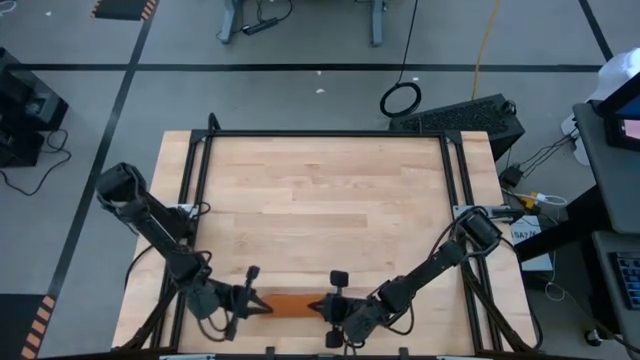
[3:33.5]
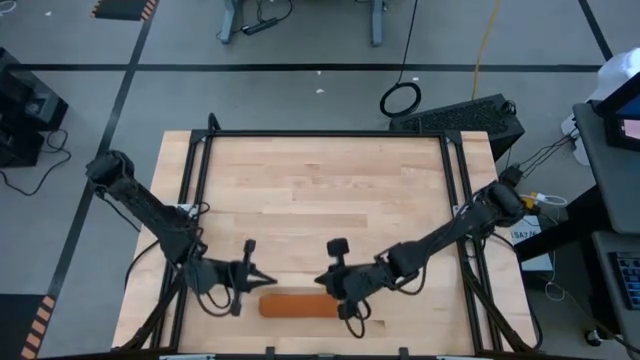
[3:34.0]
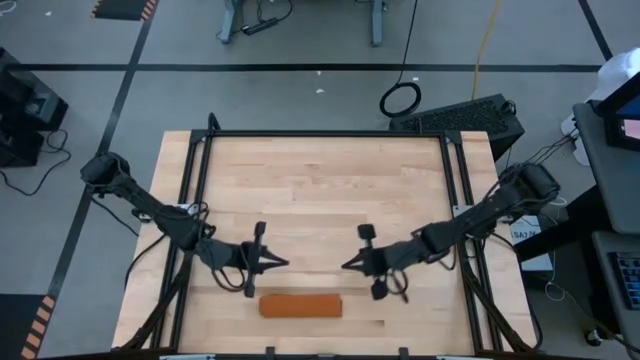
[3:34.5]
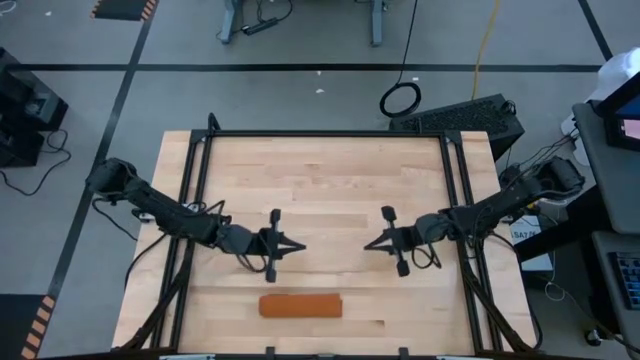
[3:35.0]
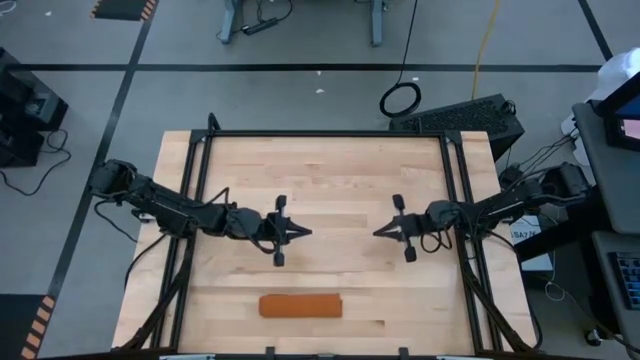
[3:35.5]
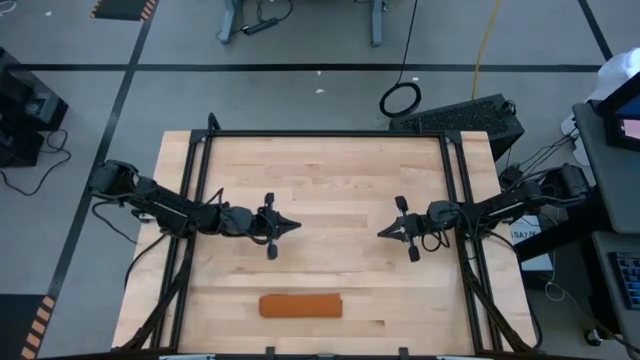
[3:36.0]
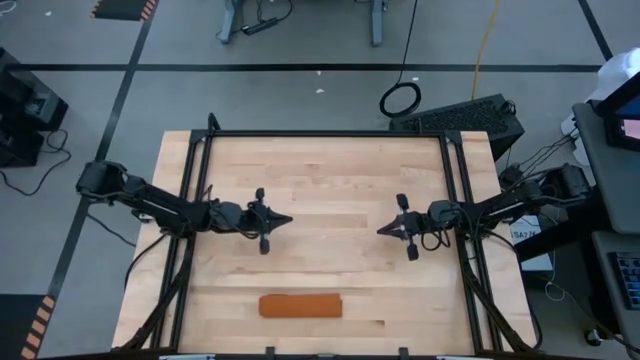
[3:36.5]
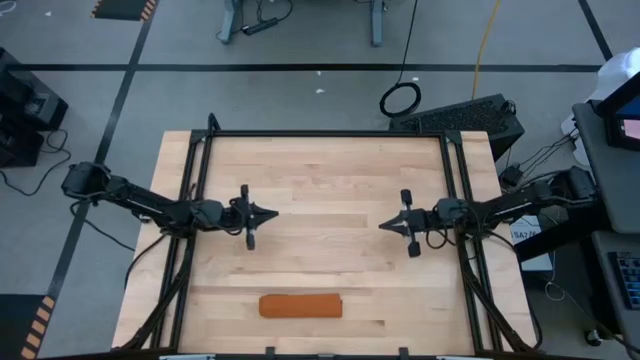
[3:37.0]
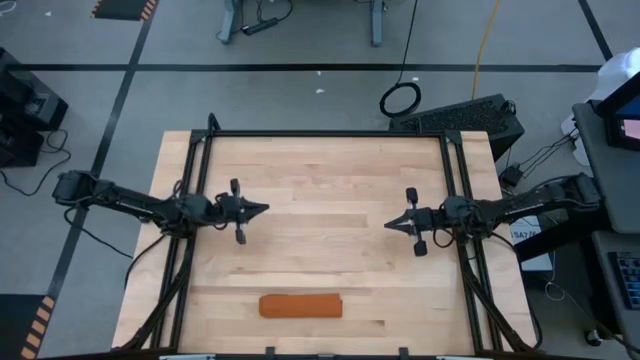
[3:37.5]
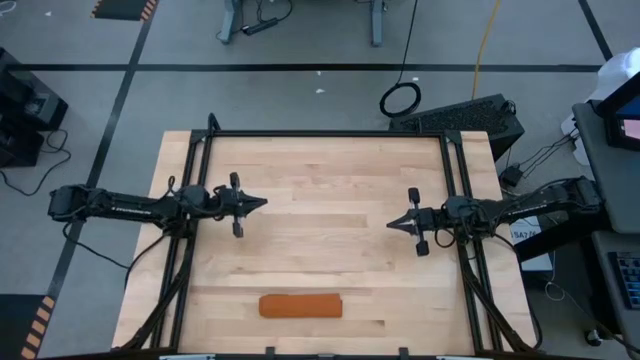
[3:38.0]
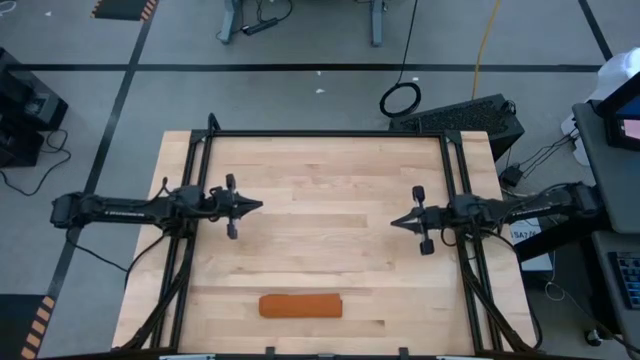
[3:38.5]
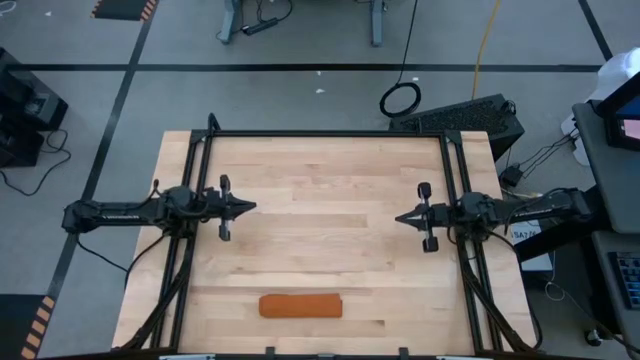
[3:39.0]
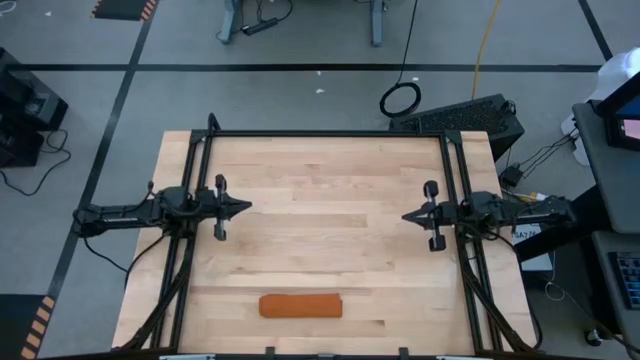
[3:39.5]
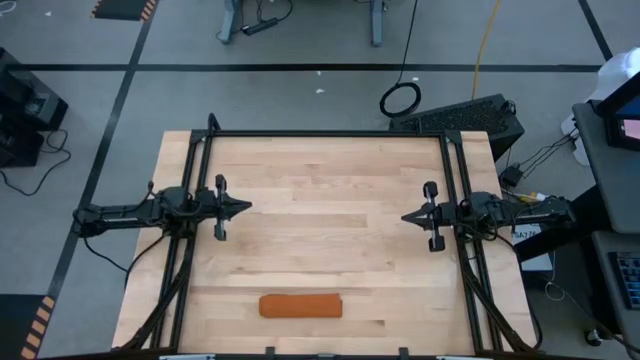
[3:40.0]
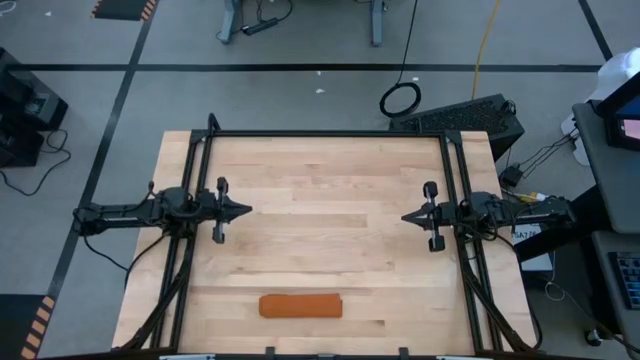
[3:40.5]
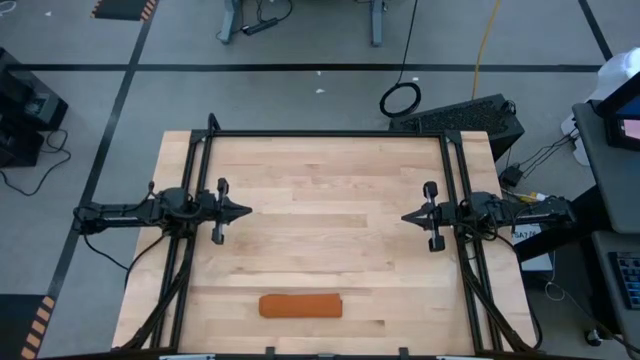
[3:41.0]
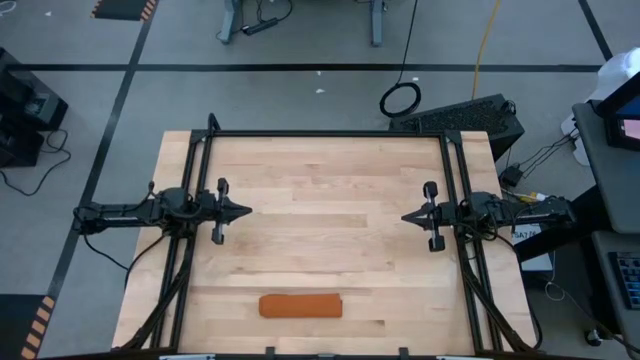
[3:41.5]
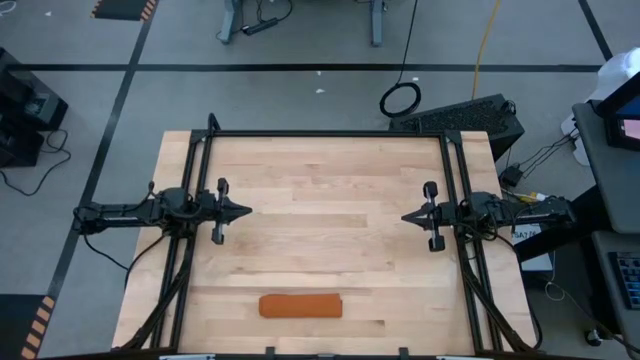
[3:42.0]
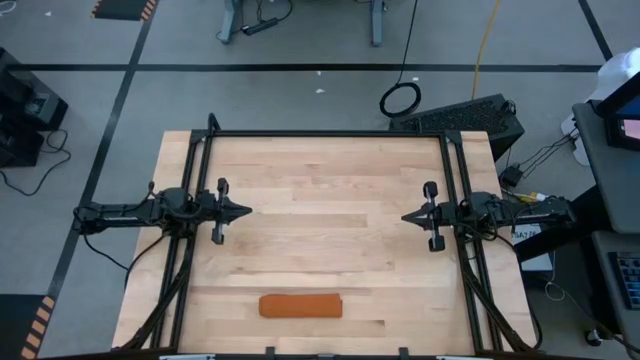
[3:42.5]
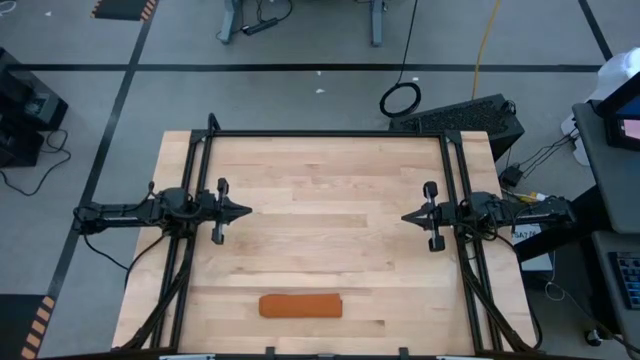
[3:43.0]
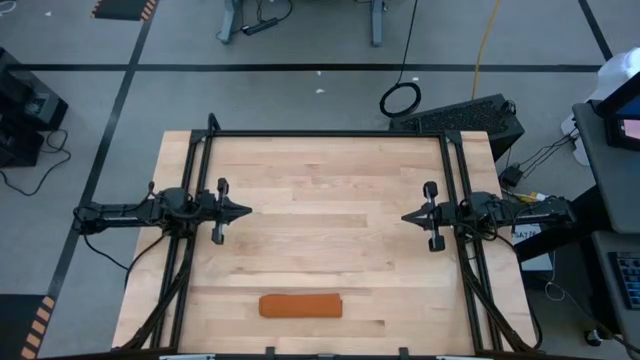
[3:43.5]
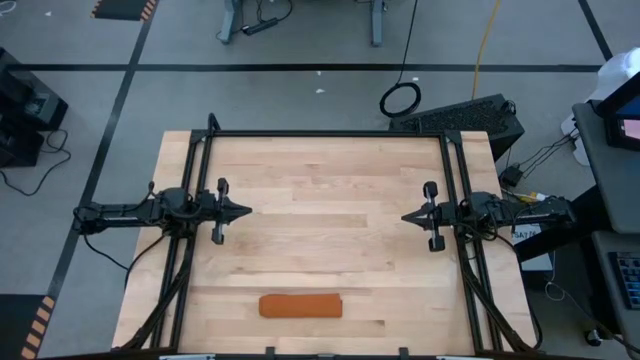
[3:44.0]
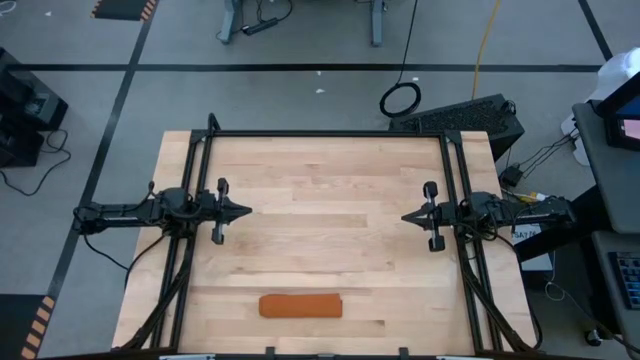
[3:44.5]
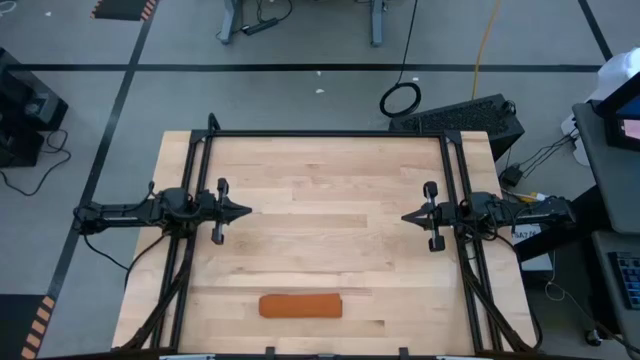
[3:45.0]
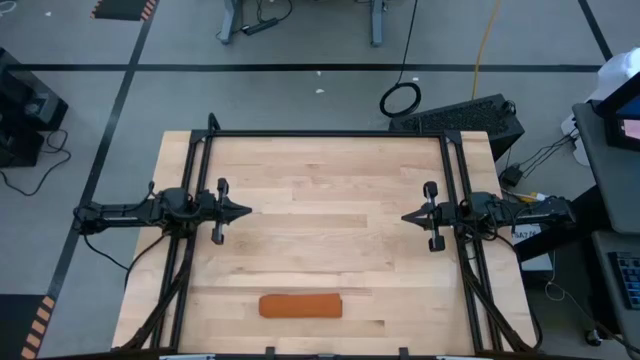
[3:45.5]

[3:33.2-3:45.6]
Task: Roll towel into tight, uniform cylinder
Return to home position

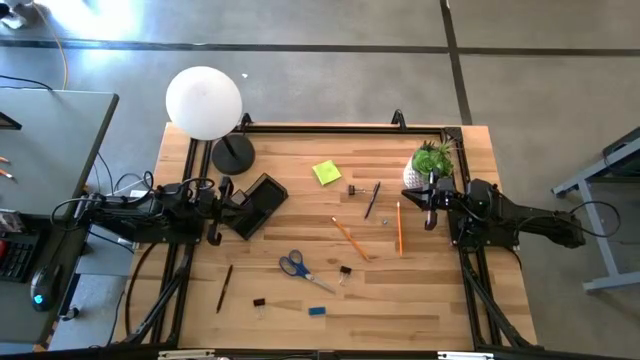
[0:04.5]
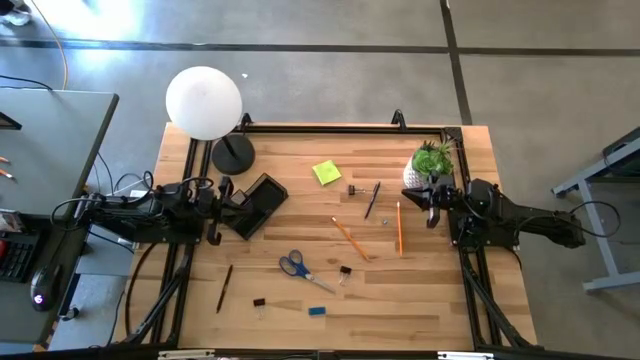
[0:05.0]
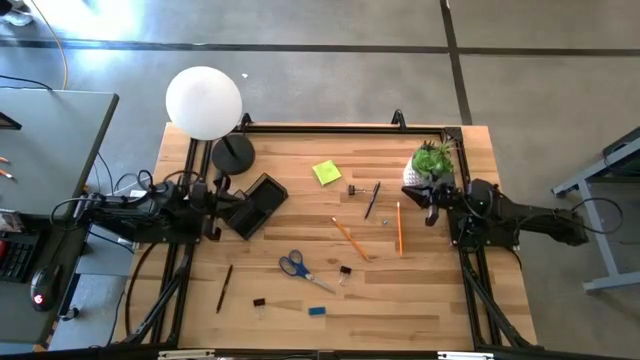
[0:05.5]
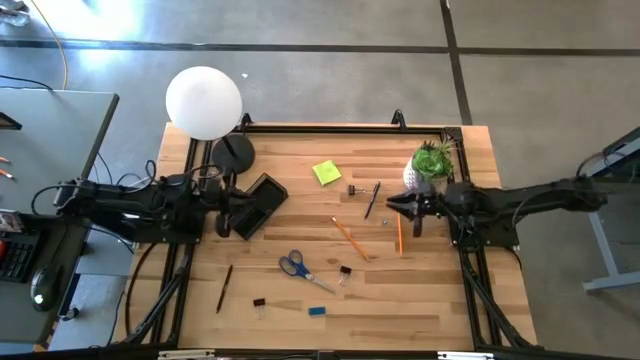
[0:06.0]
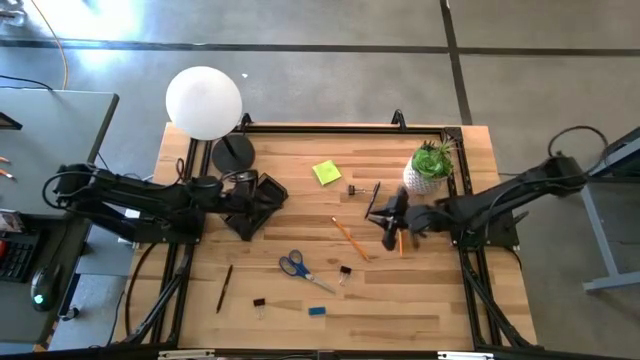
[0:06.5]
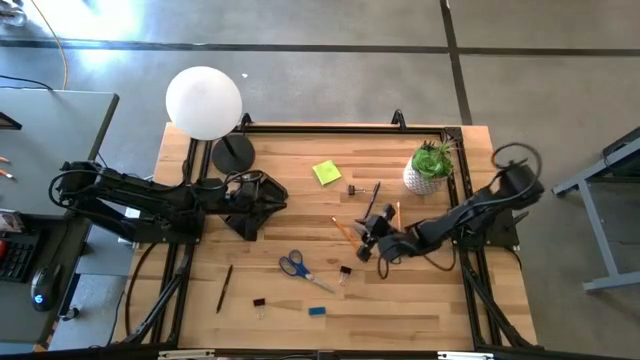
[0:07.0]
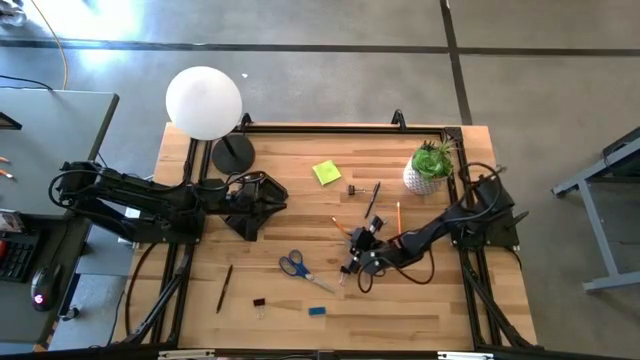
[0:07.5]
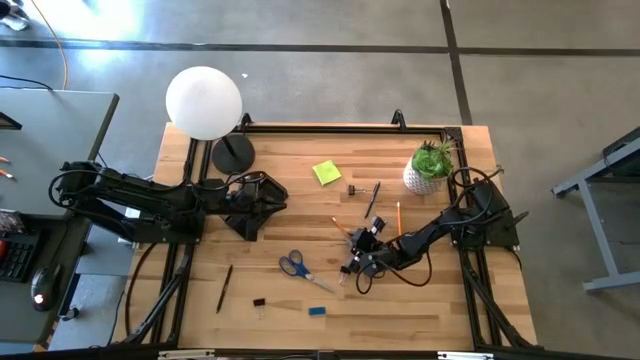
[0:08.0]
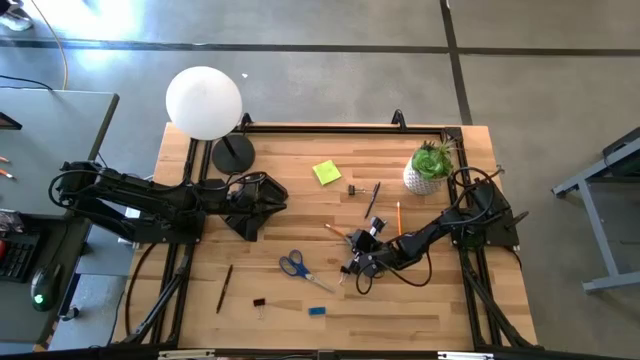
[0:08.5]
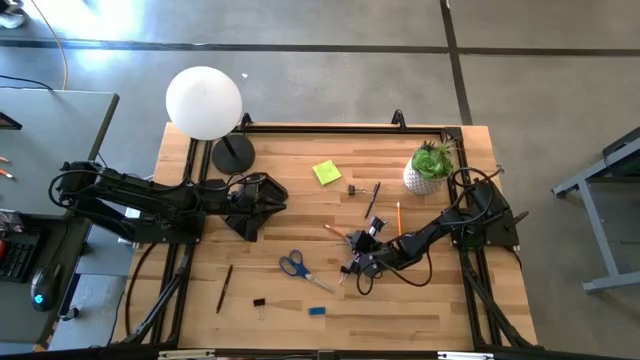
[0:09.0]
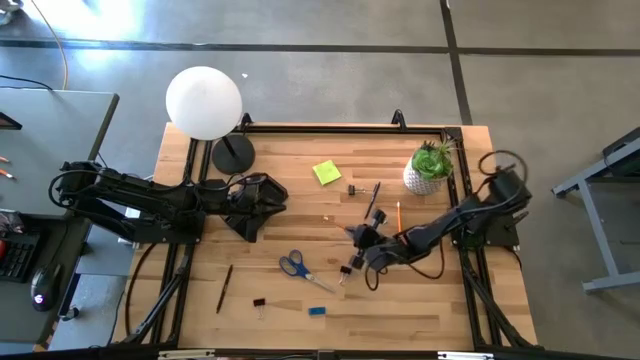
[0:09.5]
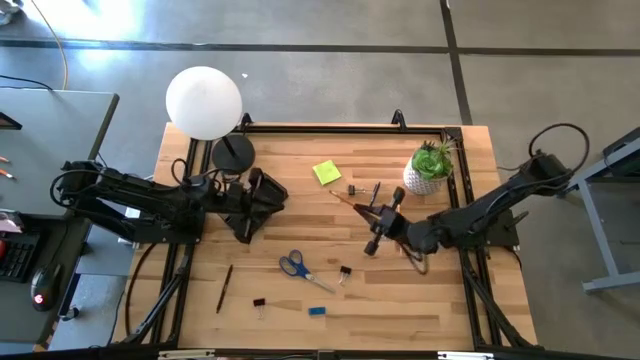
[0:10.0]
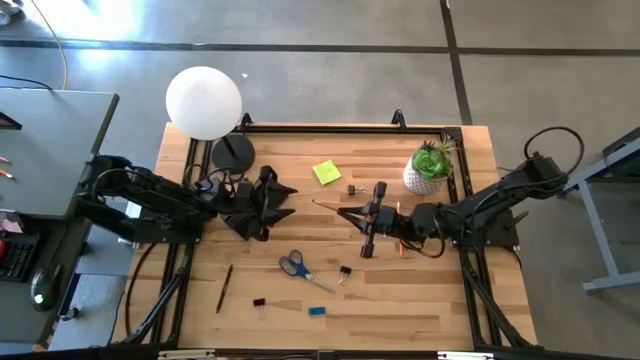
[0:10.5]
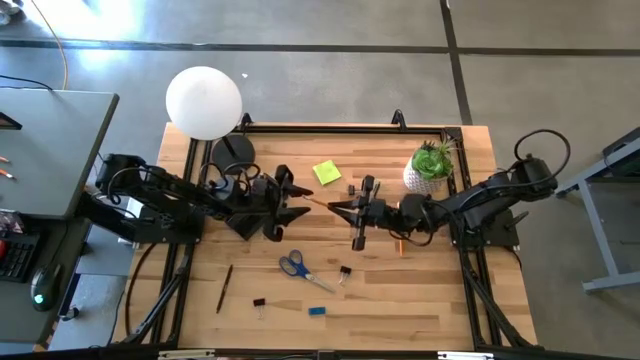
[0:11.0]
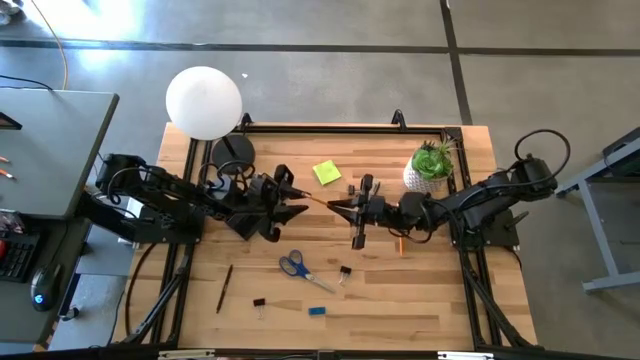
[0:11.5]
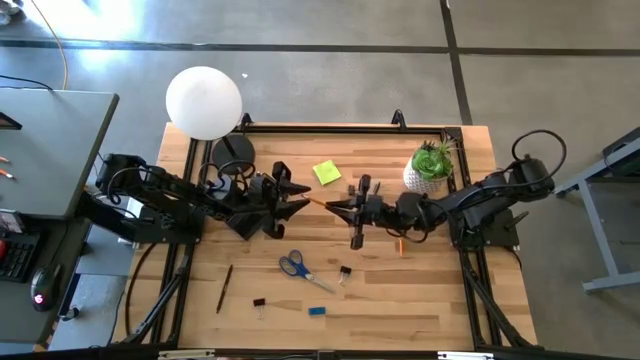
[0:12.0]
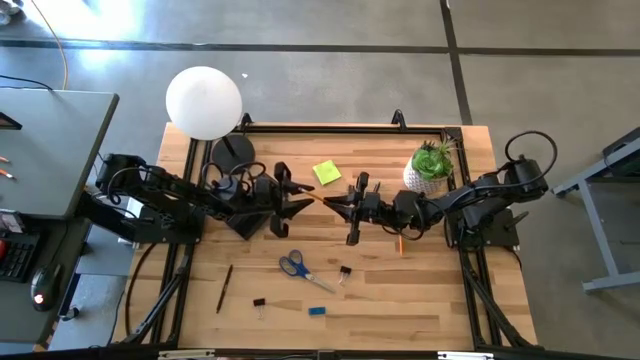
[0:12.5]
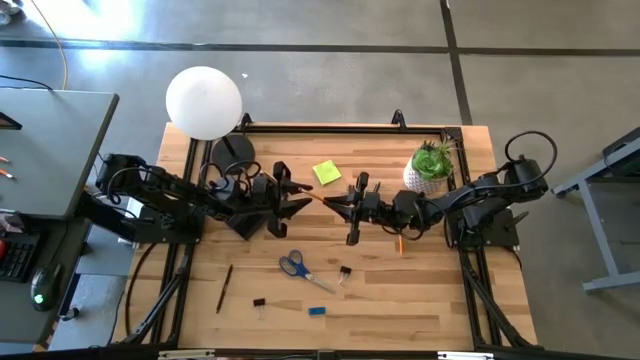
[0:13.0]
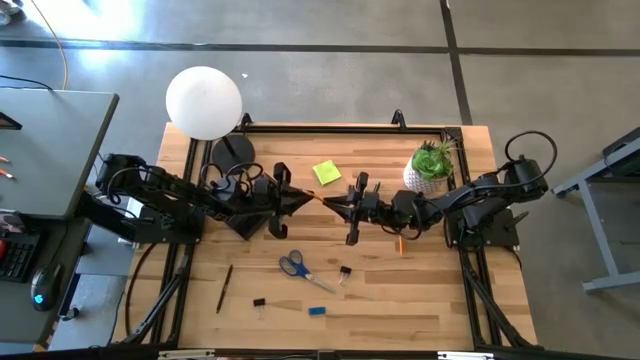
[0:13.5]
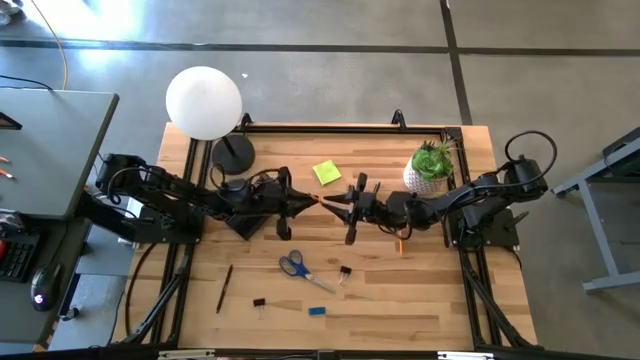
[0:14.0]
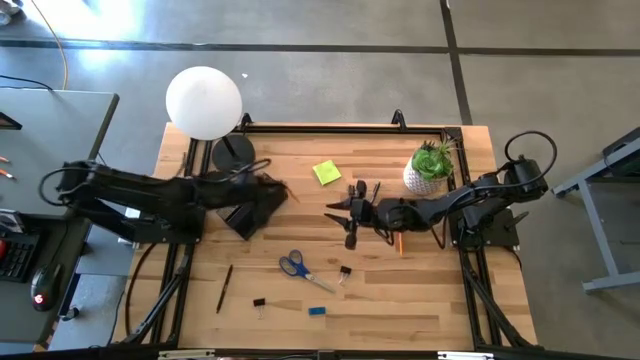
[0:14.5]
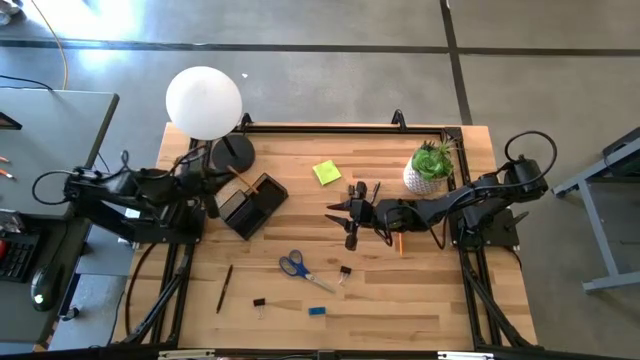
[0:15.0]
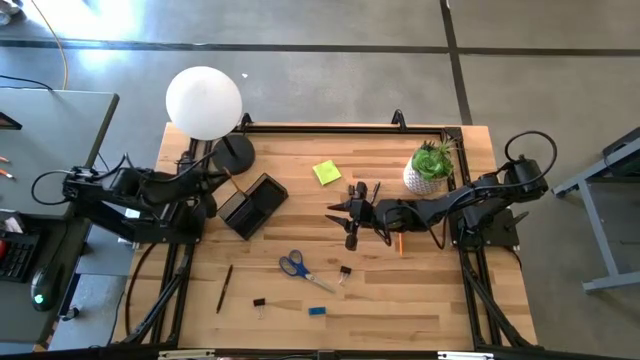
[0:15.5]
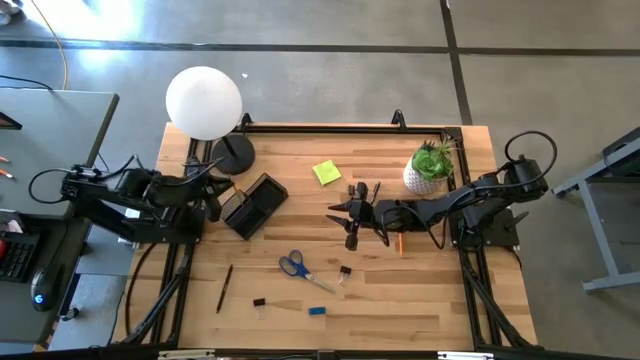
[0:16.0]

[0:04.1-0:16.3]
Task: Pick and place office supplies into organizer
Put the left orange pencil into the black mesh desk organizer
